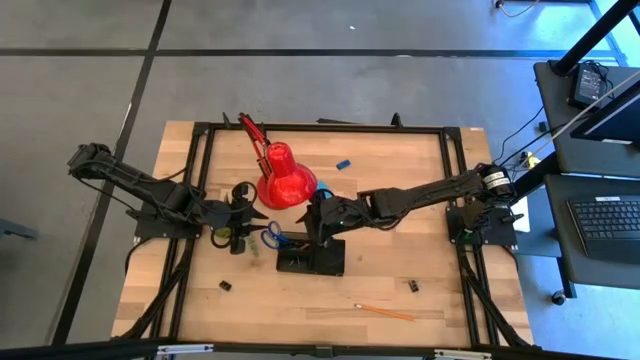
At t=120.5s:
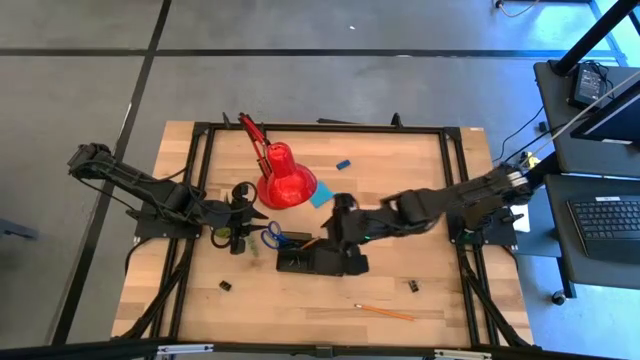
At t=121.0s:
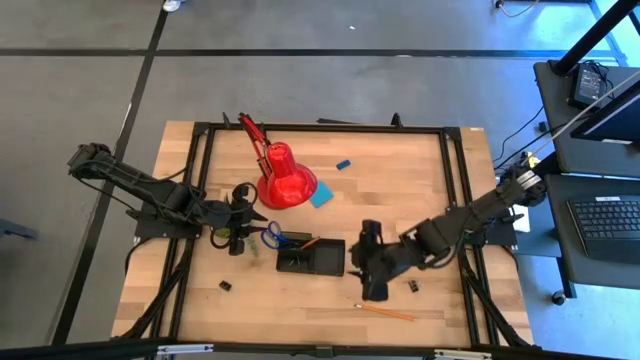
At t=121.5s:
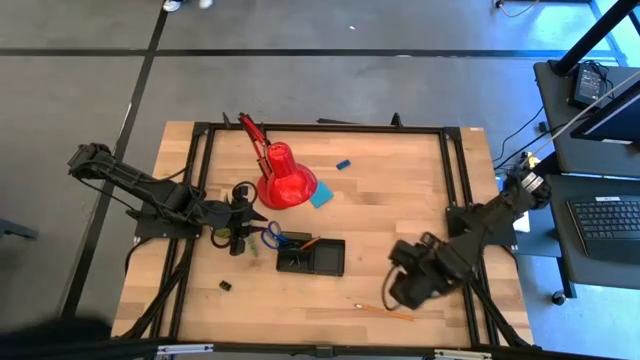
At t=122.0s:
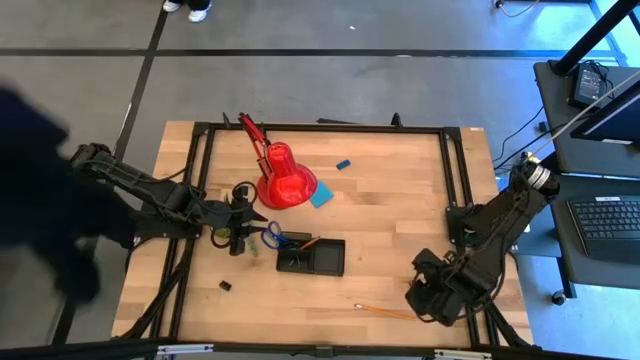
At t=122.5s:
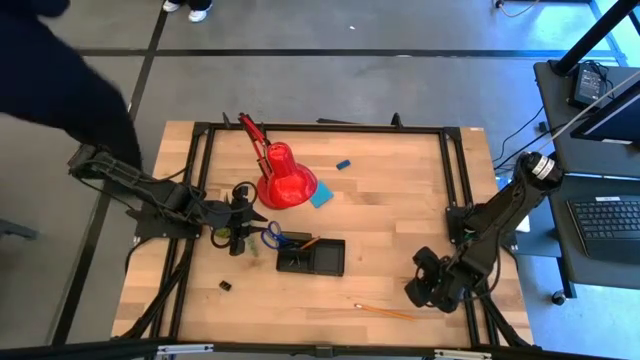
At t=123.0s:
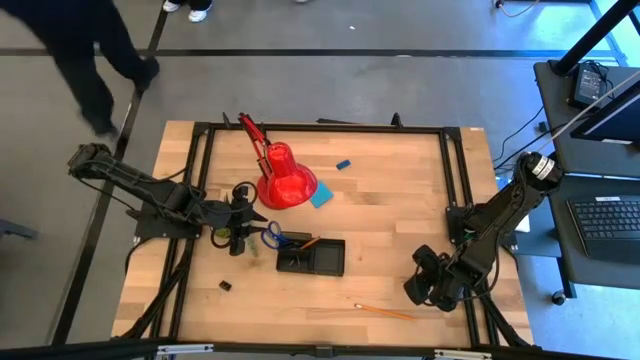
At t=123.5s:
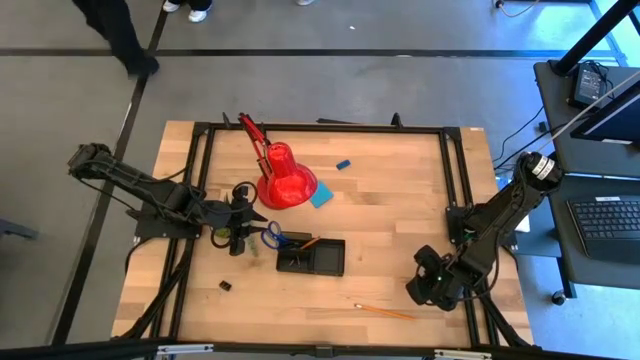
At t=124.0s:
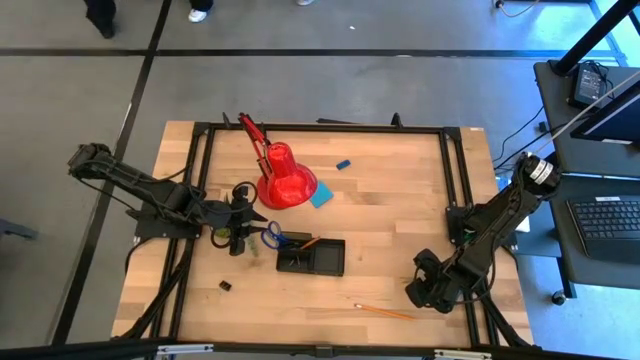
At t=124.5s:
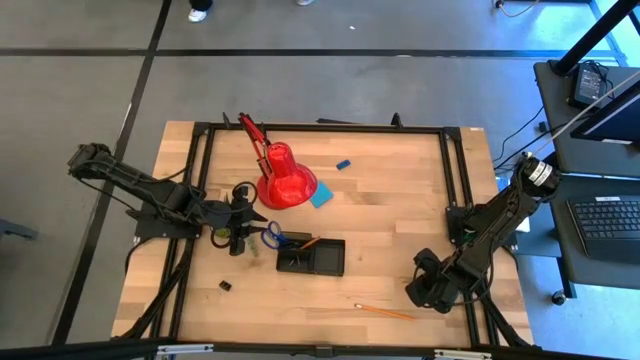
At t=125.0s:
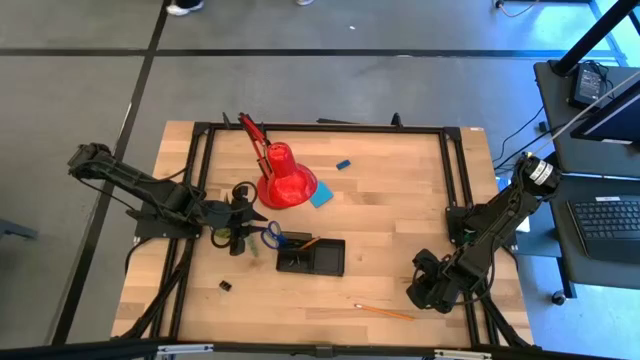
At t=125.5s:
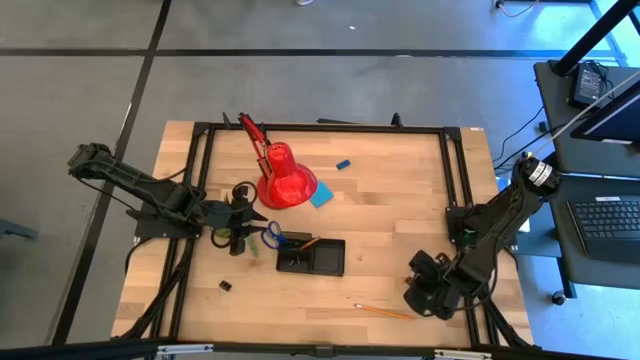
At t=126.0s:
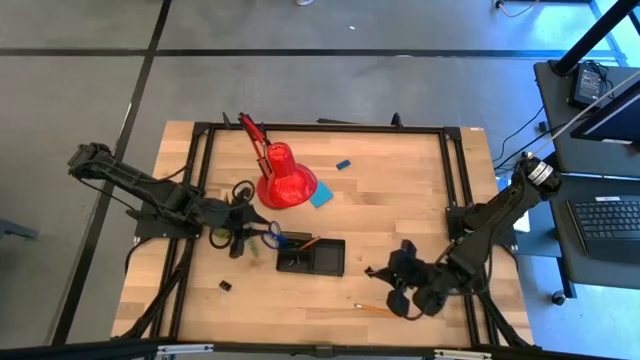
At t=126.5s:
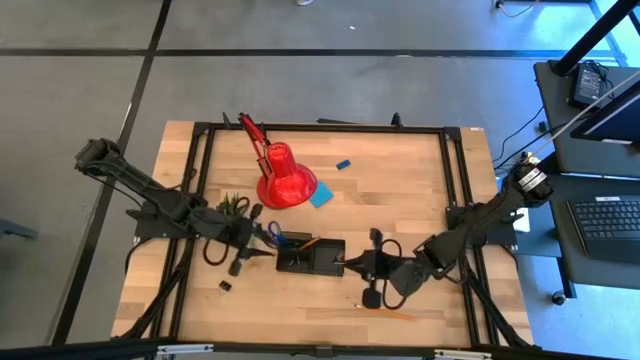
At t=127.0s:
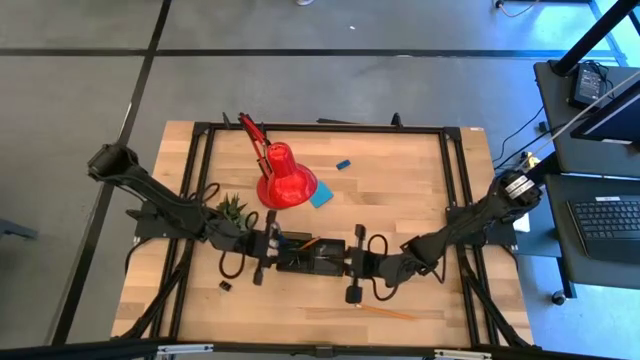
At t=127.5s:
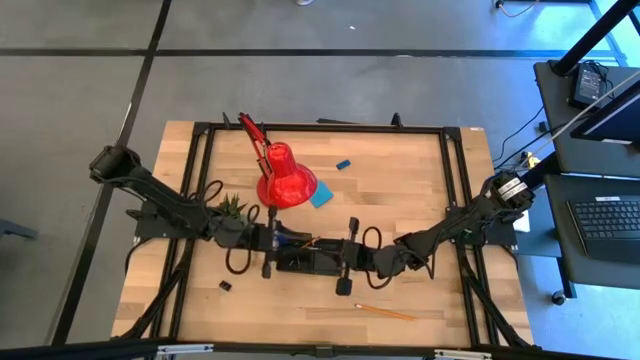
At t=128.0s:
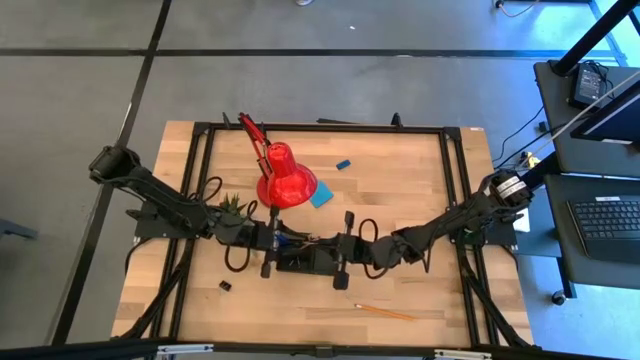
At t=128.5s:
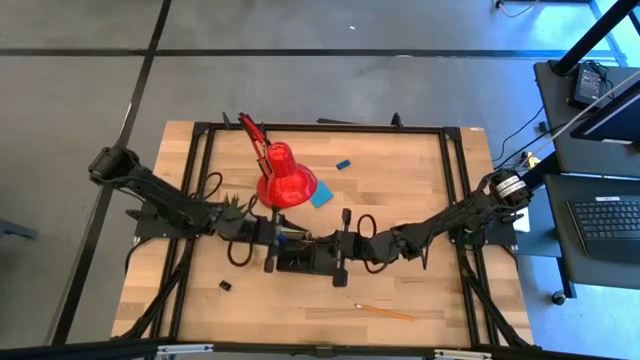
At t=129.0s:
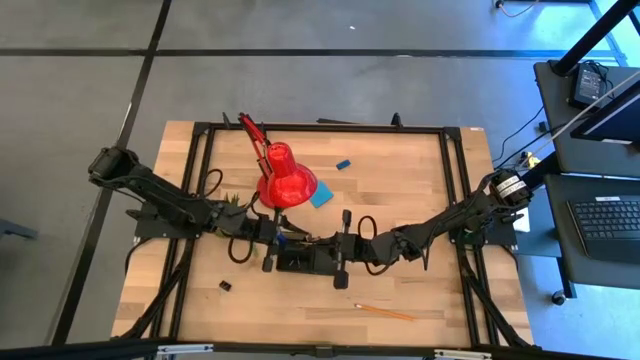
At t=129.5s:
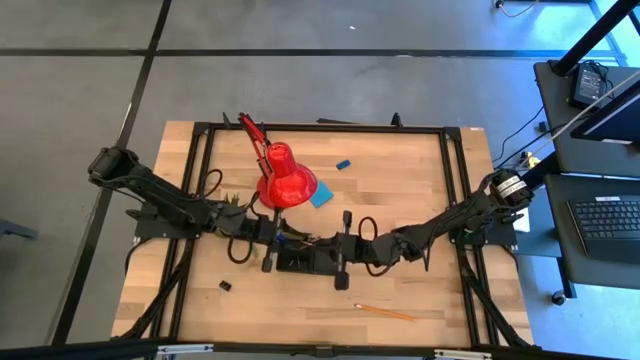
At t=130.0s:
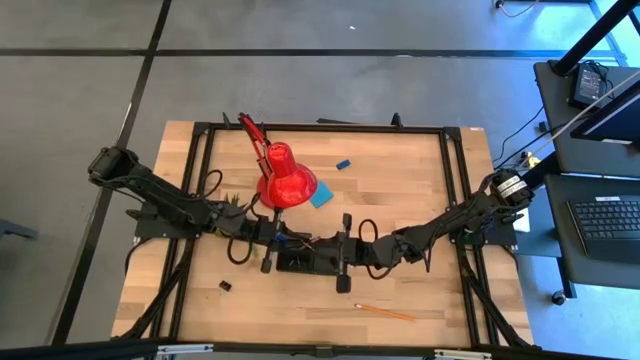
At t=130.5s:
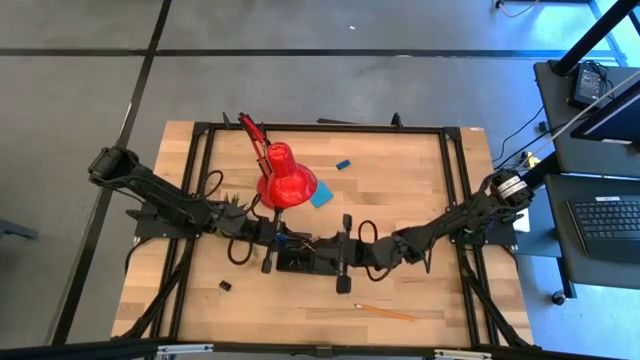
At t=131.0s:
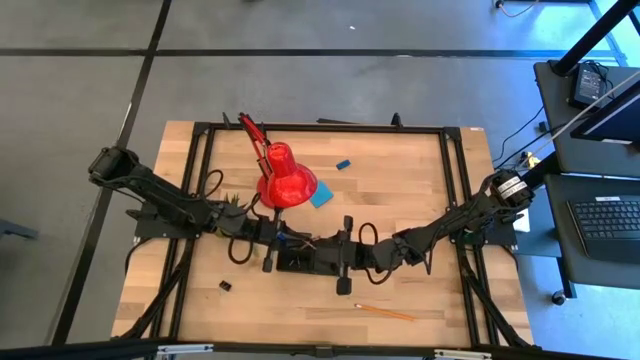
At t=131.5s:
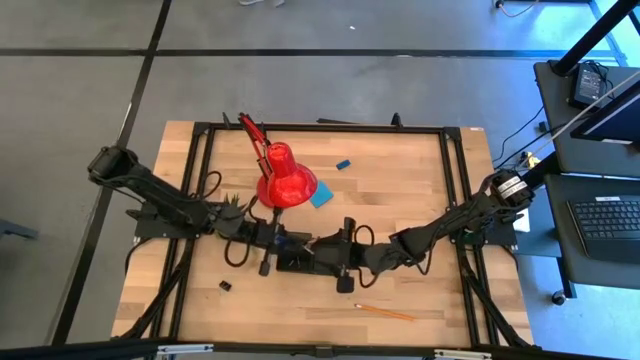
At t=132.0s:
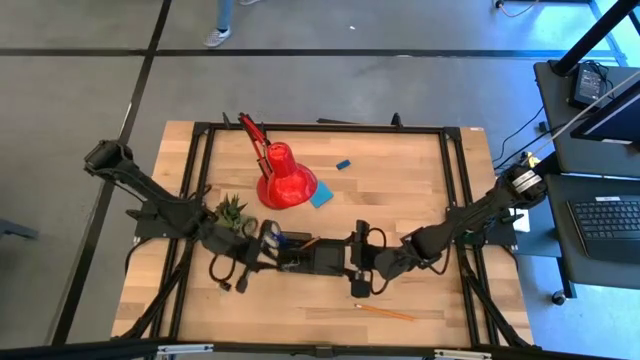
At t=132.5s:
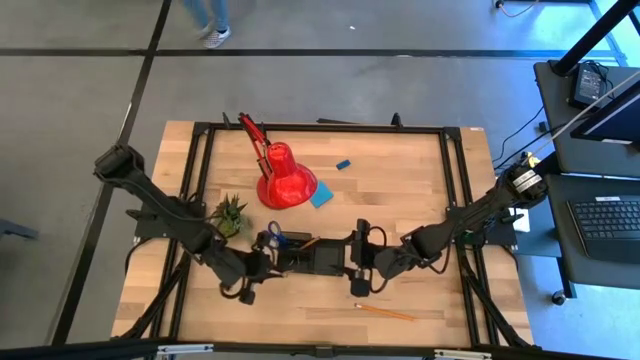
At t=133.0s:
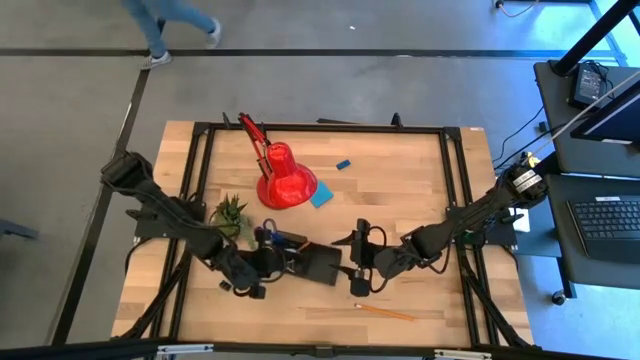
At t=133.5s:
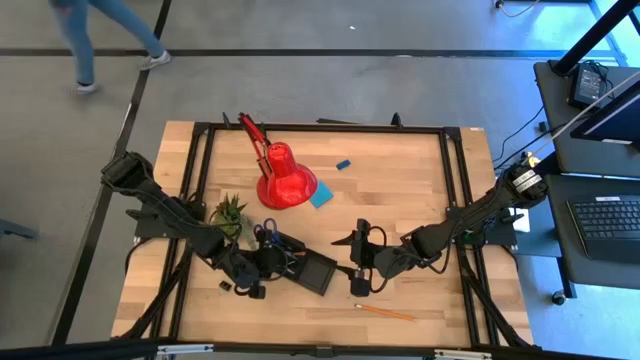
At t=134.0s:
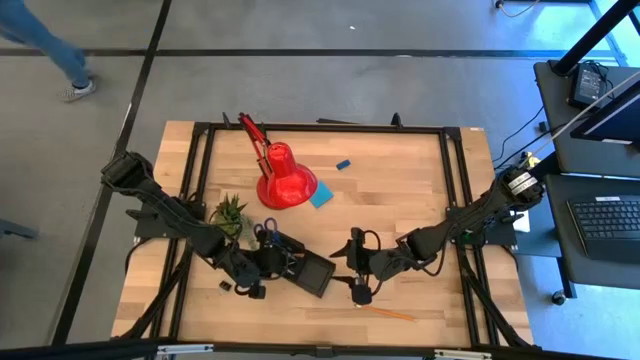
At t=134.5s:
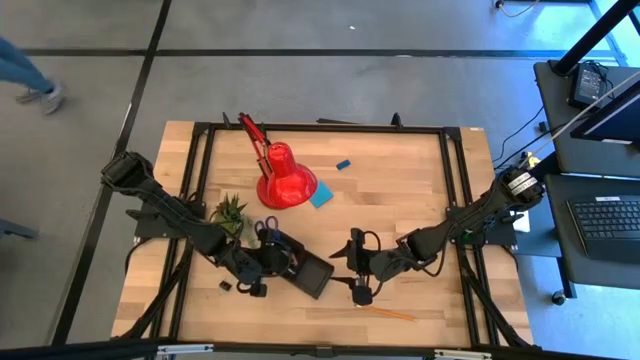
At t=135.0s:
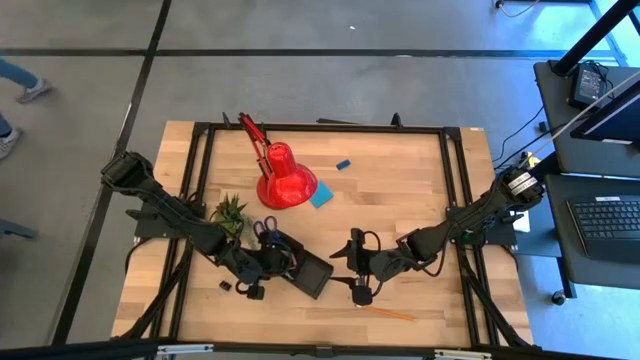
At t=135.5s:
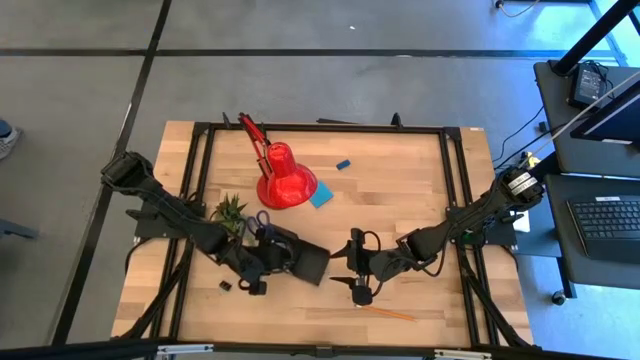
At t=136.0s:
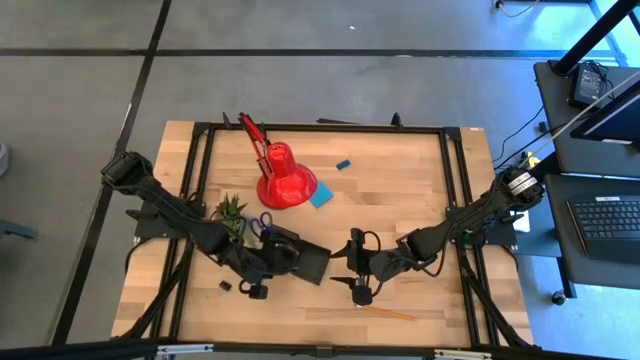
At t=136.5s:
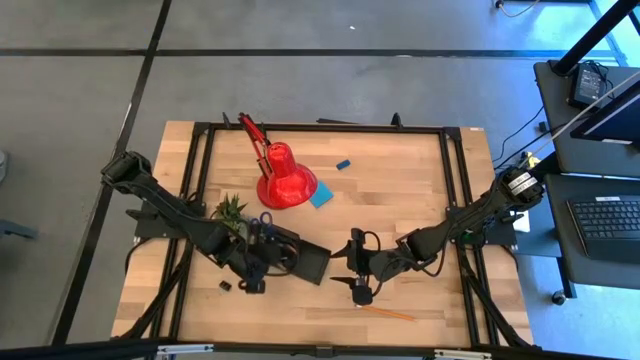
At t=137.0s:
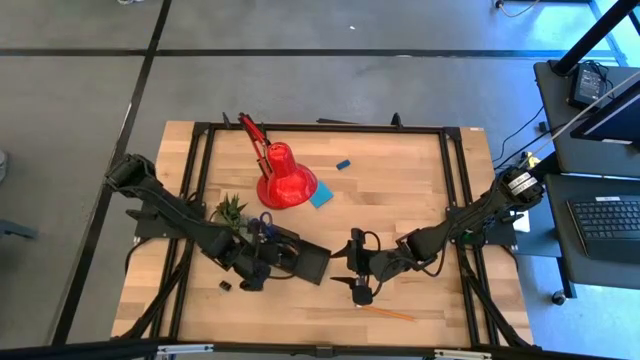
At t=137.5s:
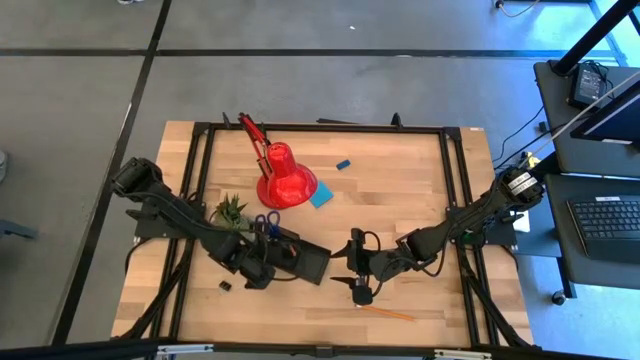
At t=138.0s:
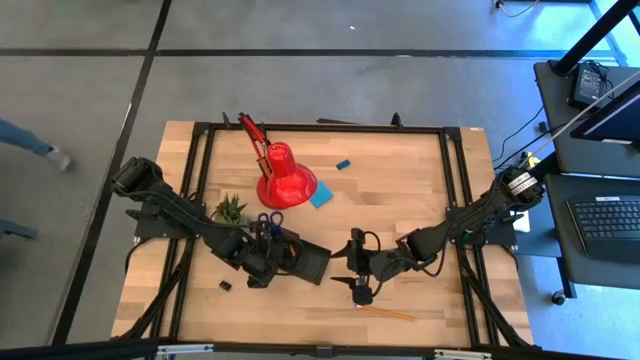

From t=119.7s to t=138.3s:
Task: Pick and place office supplies into organizer
Put the right black binder clip into the desk organizer
